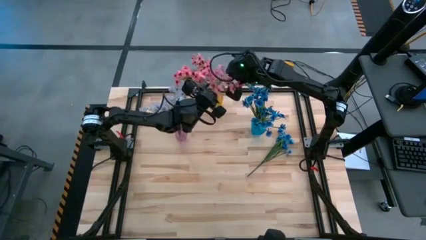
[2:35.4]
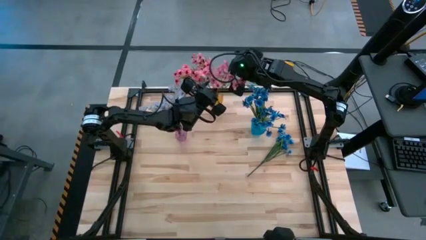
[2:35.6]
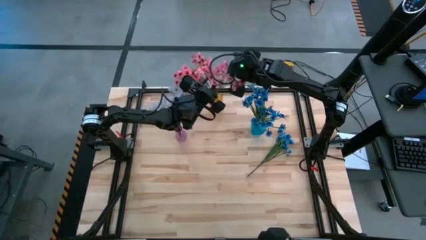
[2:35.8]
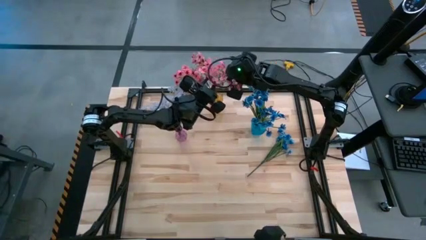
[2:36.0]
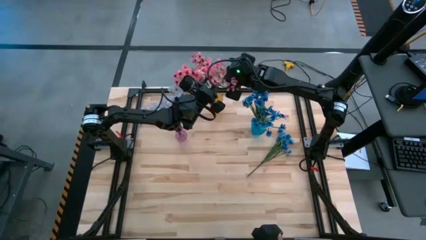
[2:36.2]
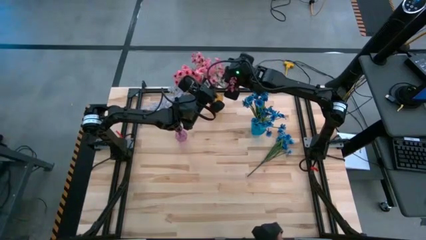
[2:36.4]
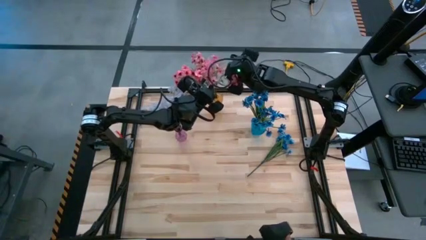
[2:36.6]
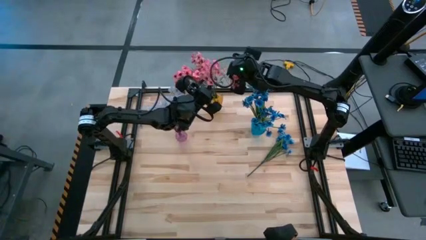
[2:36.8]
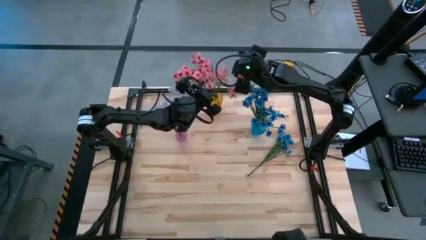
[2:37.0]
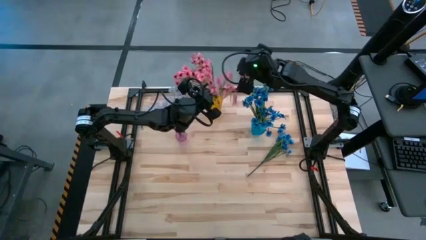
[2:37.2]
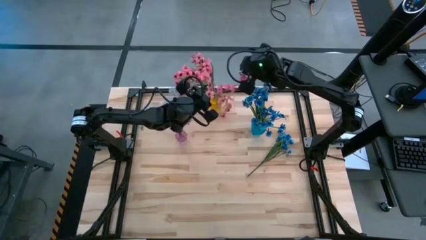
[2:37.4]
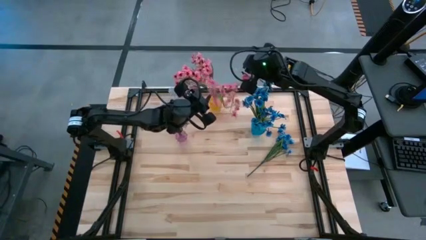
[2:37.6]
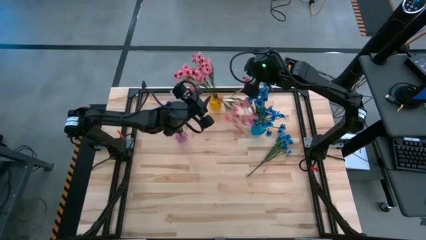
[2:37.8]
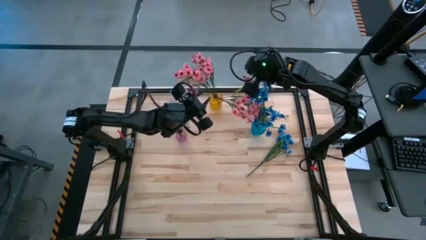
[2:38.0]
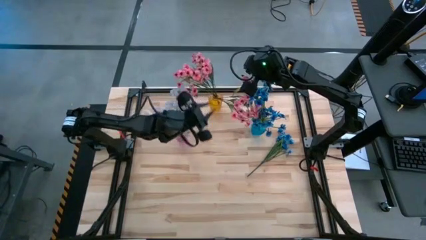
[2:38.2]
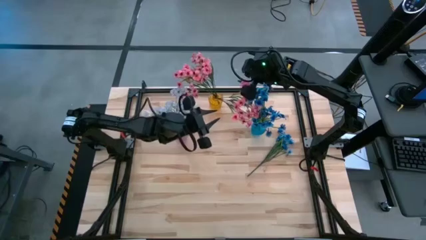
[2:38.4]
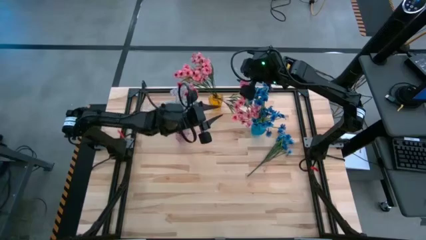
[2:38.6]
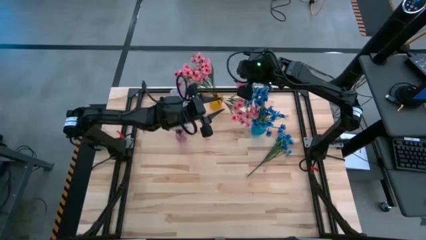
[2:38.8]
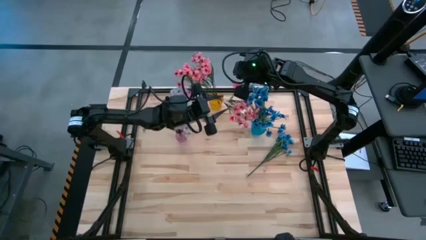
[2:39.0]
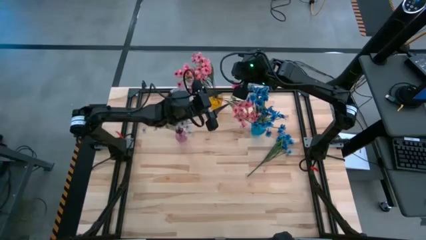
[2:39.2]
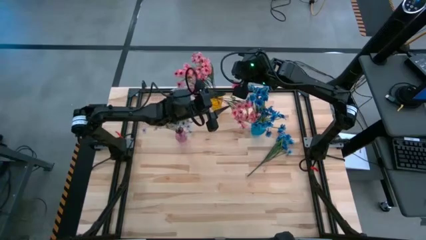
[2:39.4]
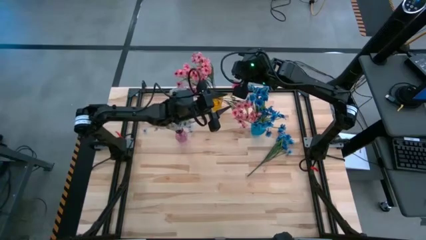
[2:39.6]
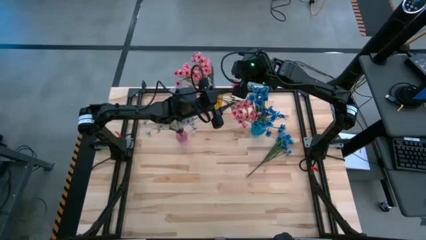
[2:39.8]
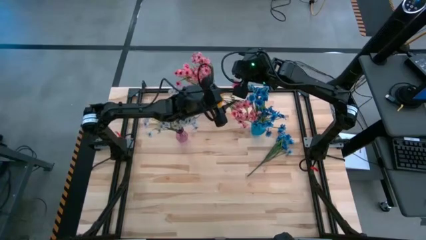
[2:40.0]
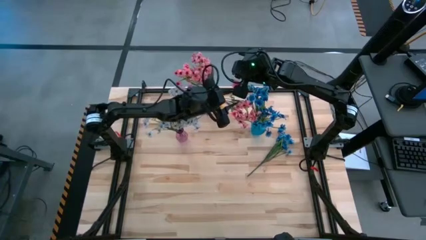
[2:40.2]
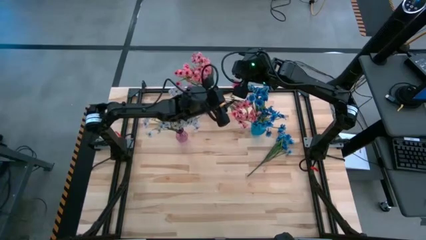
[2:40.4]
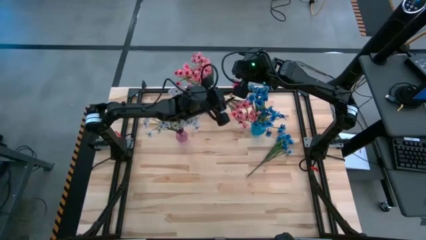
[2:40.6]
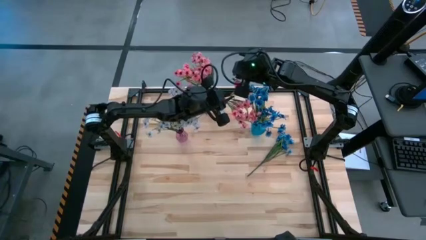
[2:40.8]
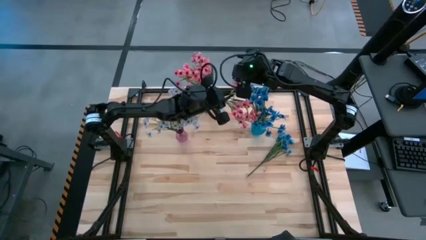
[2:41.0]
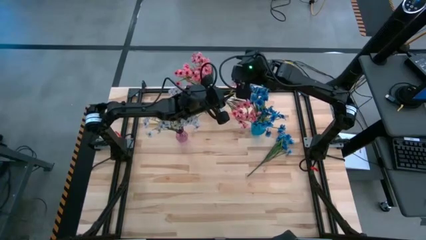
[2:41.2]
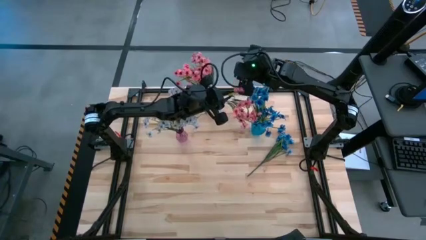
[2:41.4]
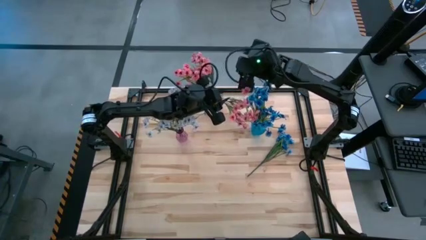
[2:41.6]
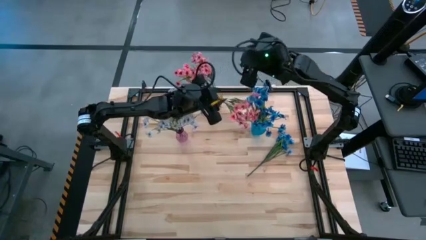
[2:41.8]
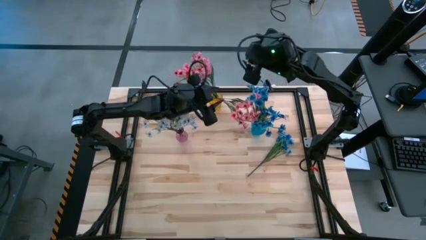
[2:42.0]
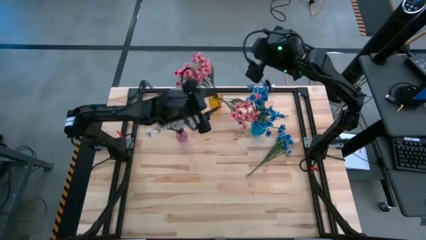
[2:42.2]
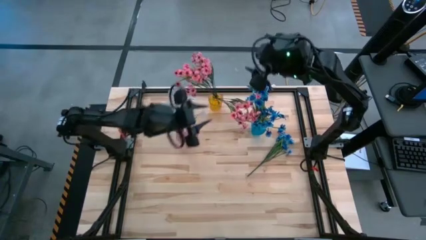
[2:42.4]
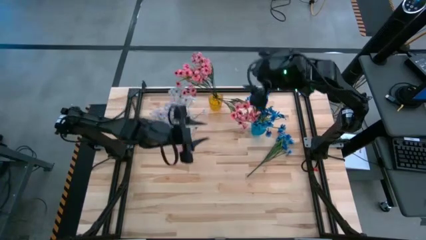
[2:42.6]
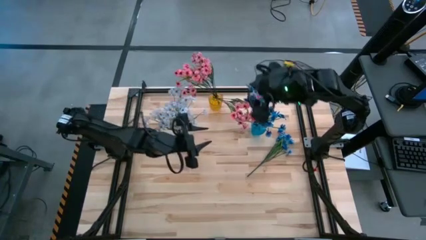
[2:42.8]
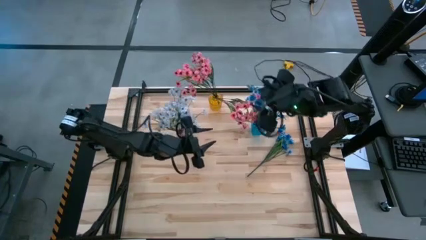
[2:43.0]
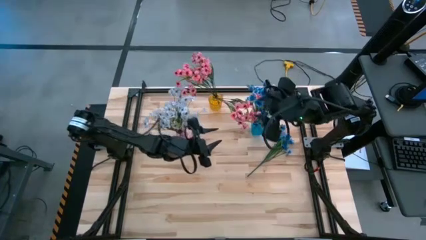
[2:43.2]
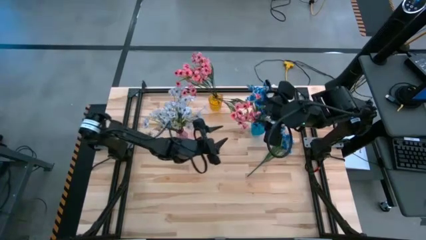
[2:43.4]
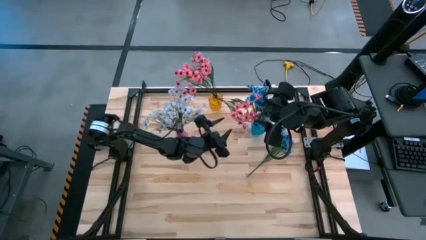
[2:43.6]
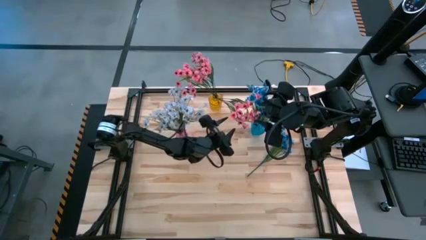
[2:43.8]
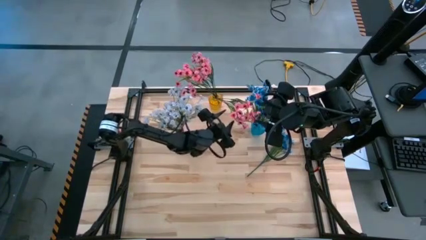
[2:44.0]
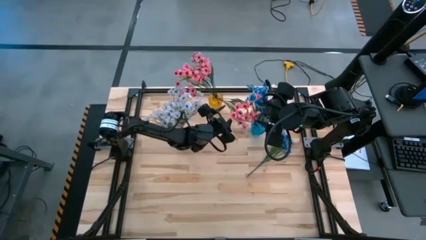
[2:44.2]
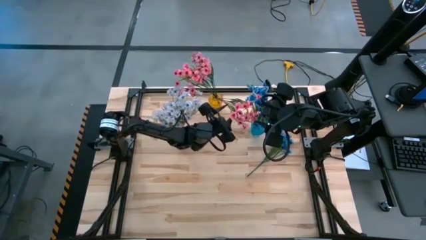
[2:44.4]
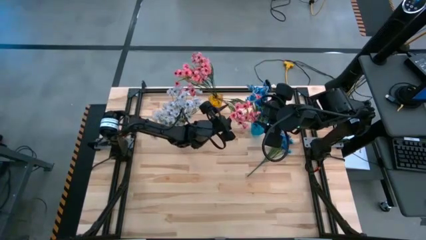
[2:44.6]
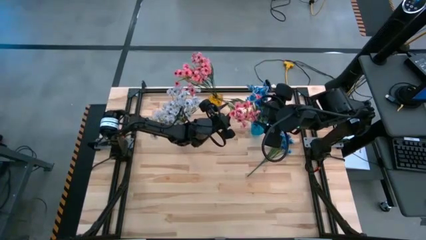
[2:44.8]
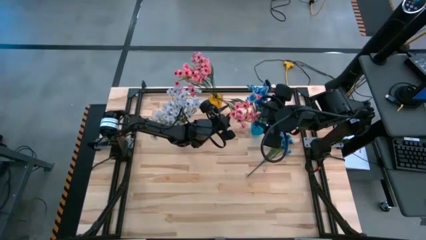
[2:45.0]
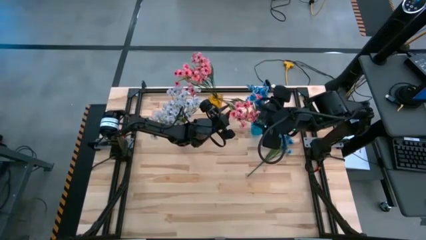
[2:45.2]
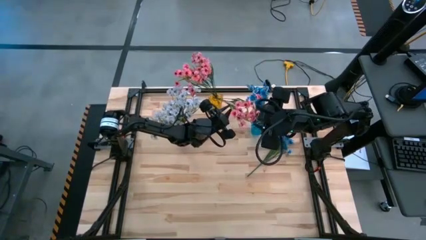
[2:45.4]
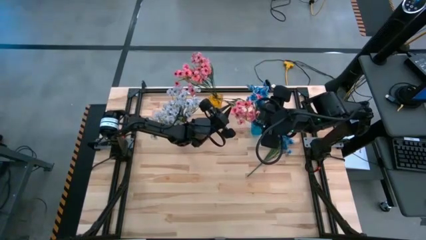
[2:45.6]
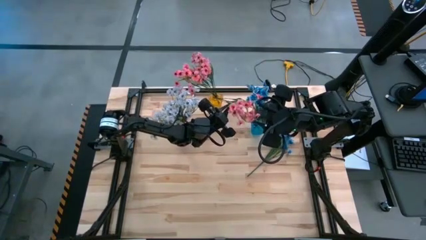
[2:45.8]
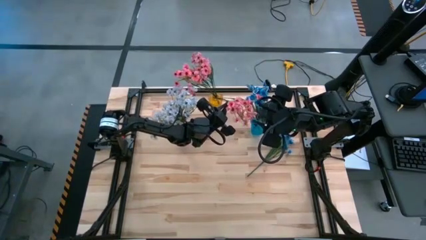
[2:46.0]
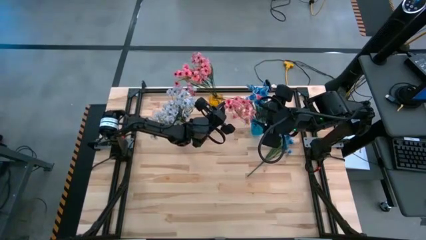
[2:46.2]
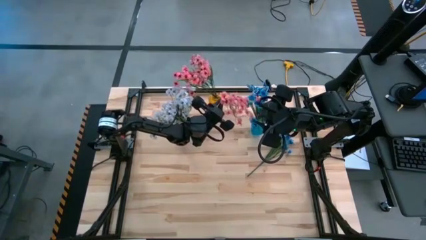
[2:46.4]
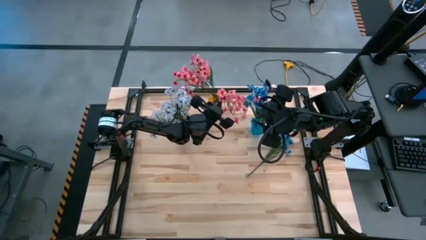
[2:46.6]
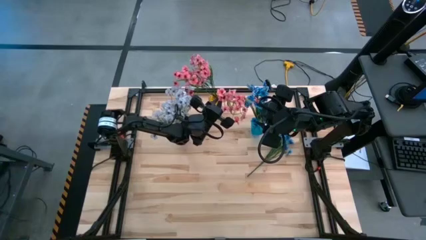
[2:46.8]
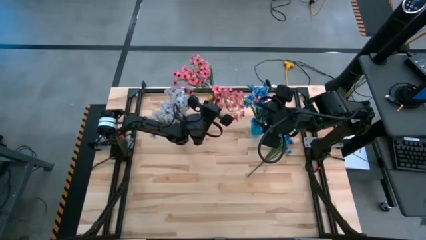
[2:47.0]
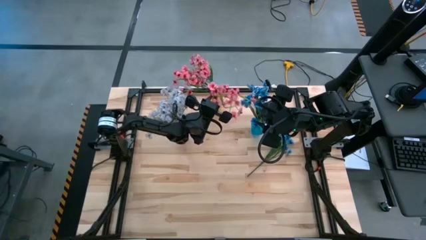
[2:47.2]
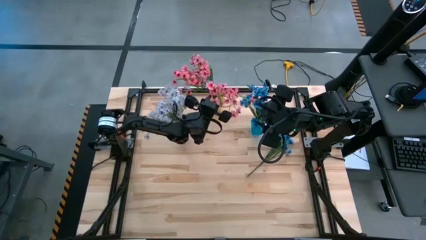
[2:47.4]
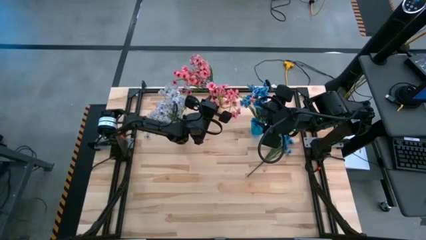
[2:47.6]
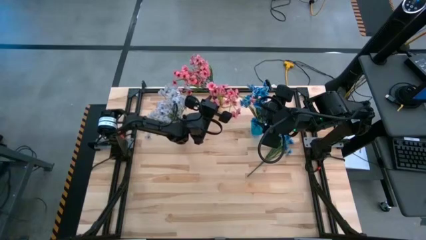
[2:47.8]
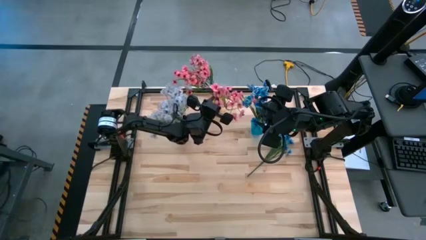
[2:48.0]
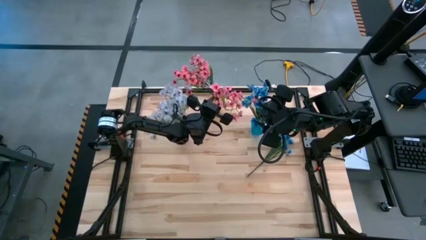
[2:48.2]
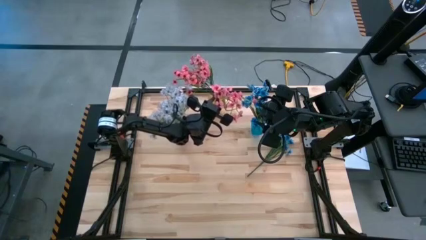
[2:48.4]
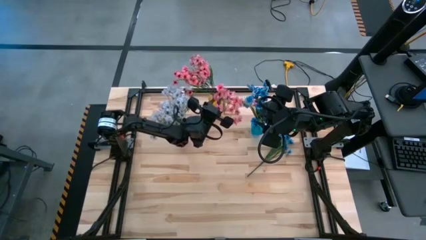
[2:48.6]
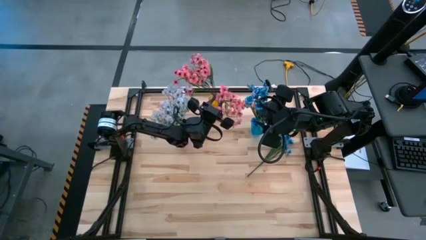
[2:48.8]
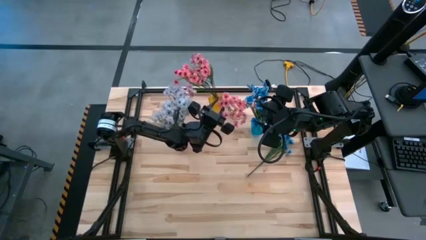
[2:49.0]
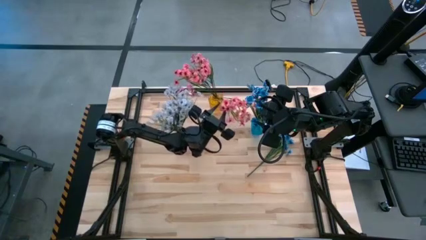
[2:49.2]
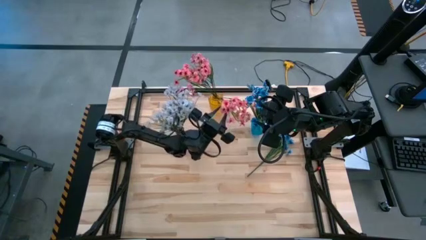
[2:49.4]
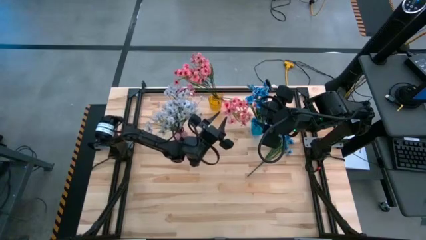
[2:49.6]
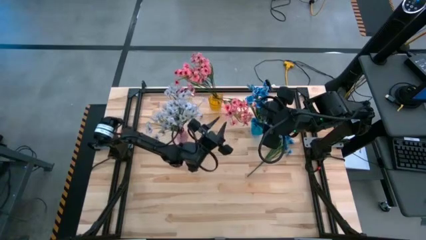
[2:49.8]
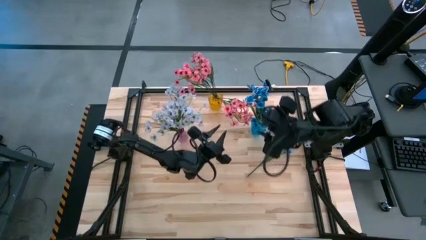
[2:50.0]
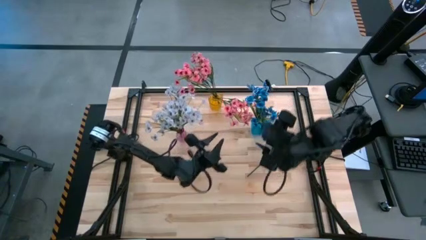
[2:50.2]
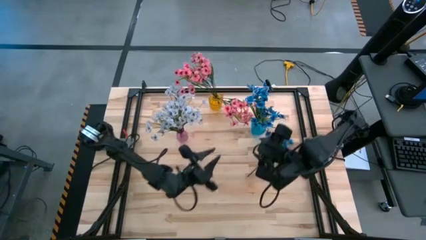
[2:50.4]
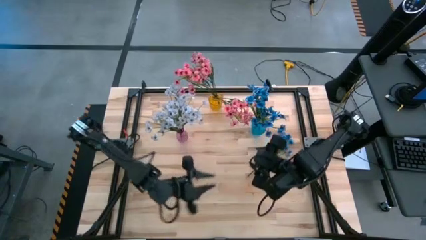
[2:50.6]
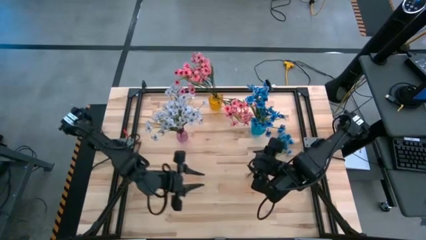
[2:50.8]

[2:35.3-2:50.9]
Task: Sort flowers into vase by color
Put the pink flowers into the yellow vase
